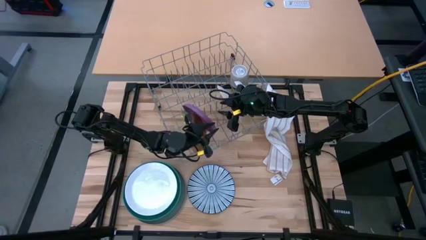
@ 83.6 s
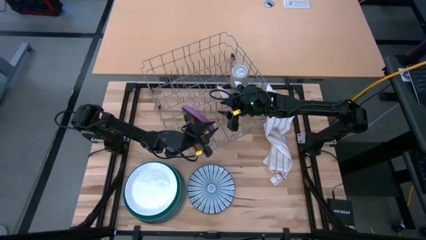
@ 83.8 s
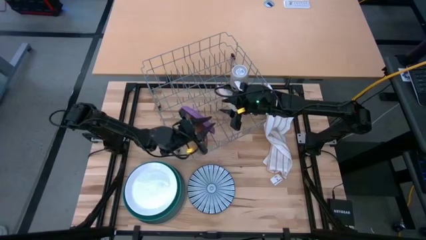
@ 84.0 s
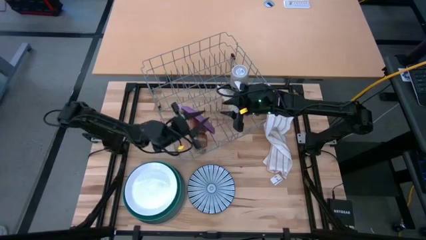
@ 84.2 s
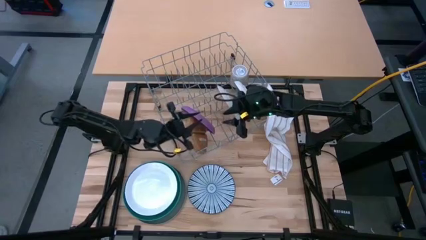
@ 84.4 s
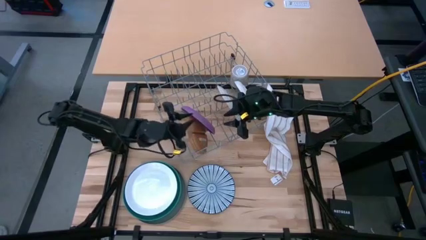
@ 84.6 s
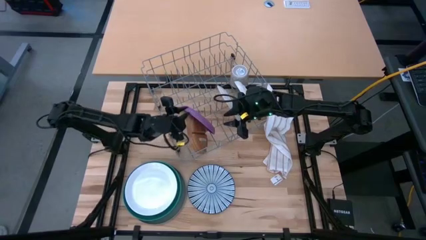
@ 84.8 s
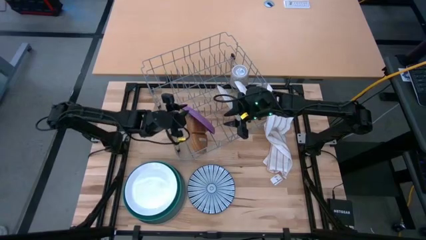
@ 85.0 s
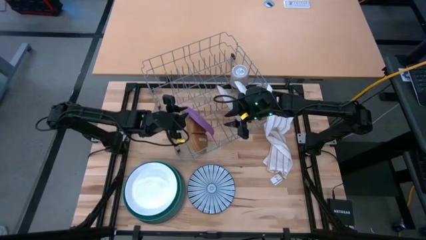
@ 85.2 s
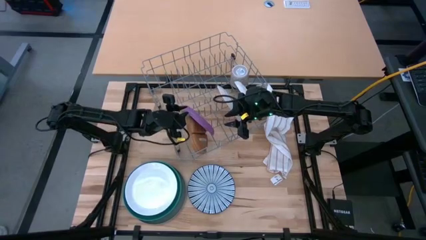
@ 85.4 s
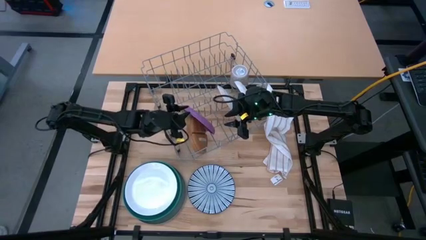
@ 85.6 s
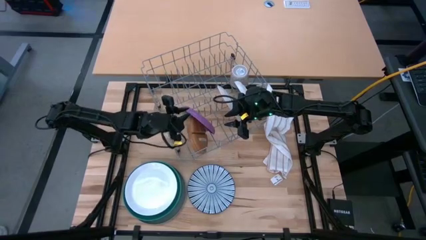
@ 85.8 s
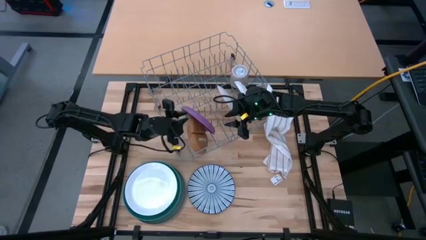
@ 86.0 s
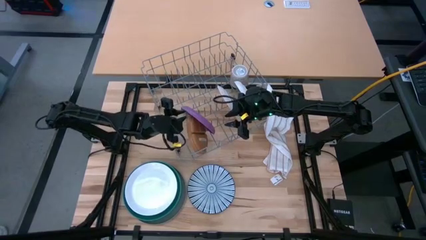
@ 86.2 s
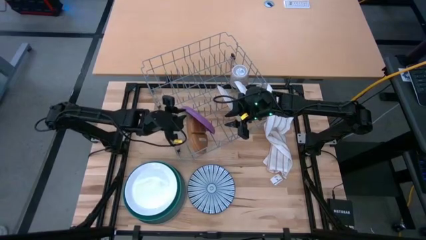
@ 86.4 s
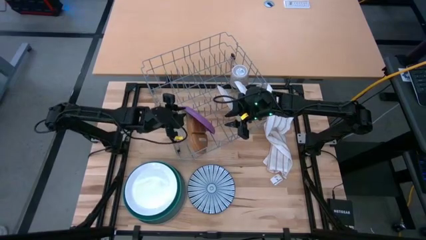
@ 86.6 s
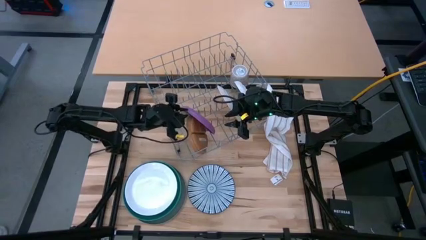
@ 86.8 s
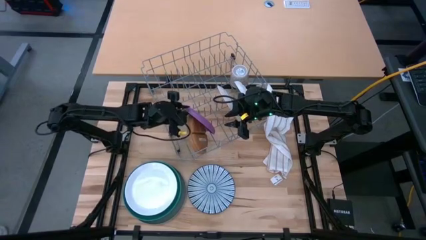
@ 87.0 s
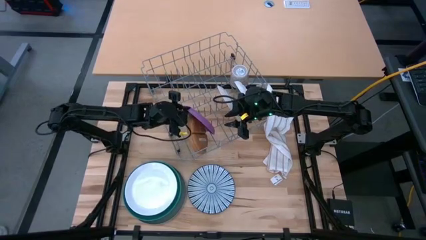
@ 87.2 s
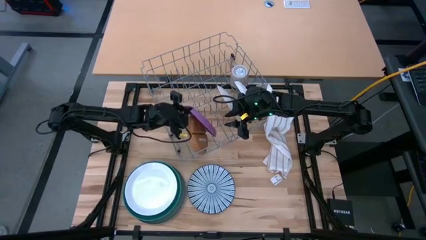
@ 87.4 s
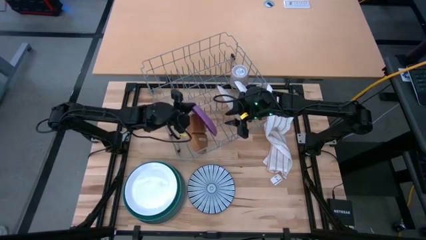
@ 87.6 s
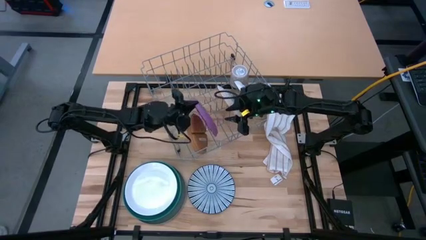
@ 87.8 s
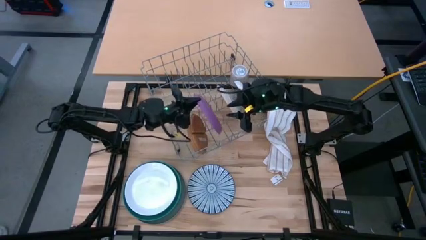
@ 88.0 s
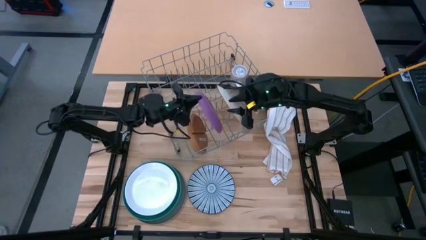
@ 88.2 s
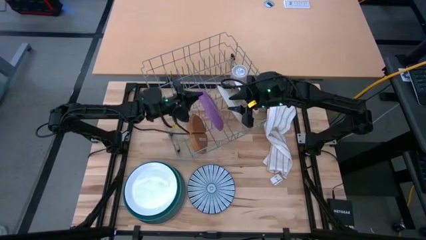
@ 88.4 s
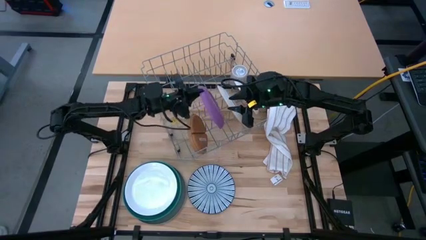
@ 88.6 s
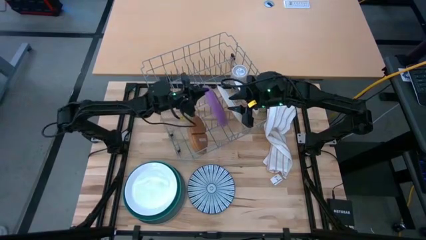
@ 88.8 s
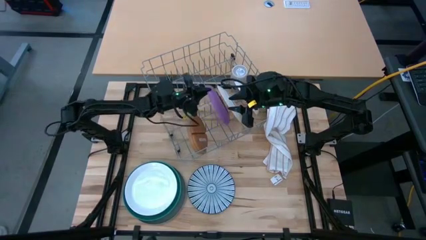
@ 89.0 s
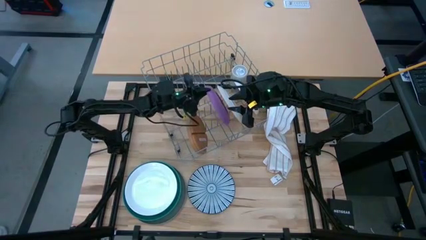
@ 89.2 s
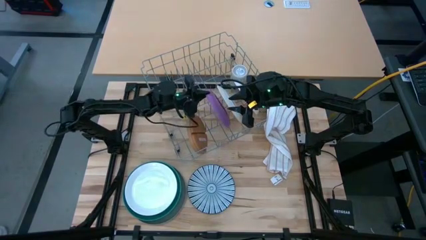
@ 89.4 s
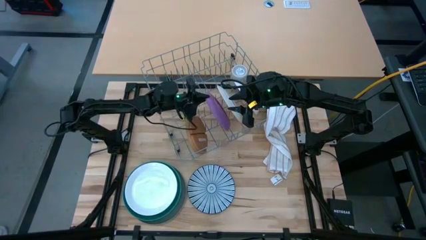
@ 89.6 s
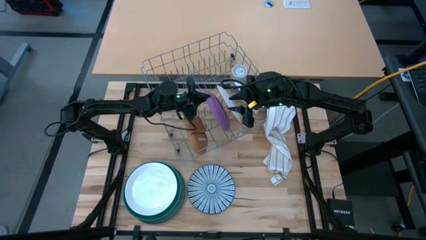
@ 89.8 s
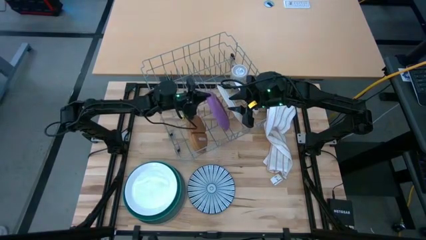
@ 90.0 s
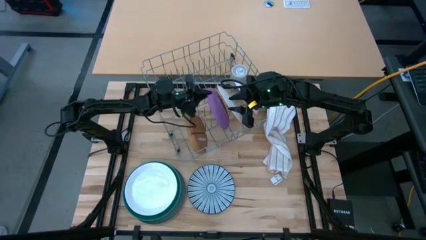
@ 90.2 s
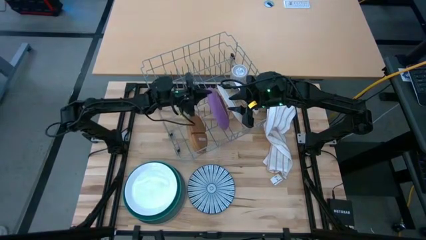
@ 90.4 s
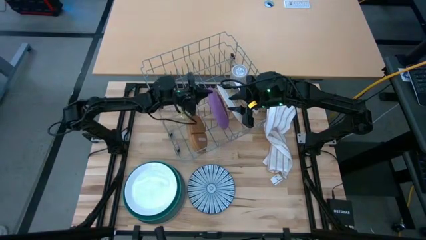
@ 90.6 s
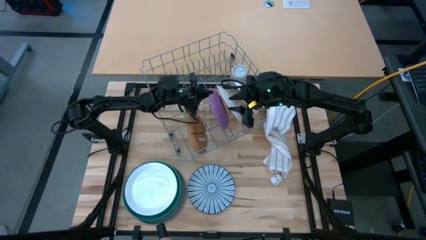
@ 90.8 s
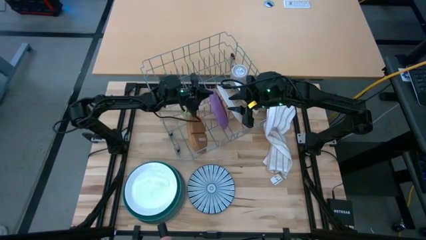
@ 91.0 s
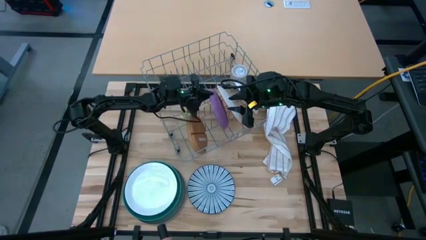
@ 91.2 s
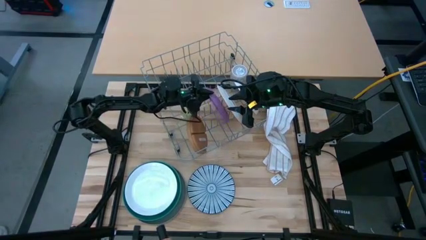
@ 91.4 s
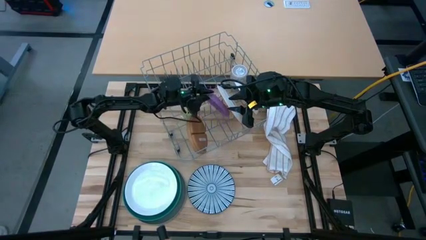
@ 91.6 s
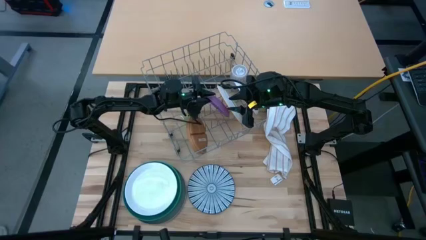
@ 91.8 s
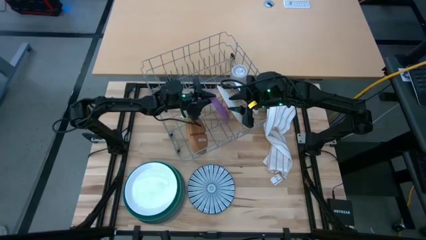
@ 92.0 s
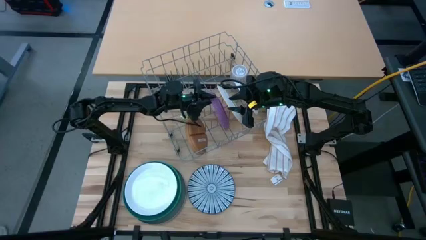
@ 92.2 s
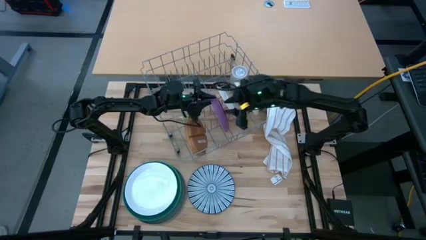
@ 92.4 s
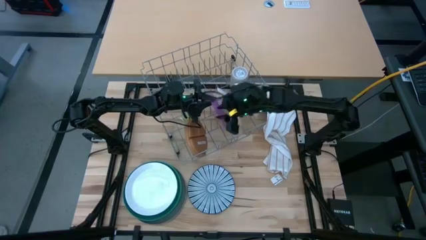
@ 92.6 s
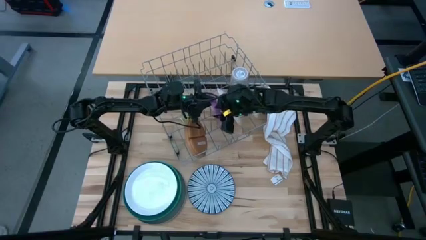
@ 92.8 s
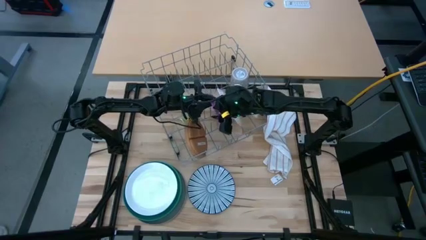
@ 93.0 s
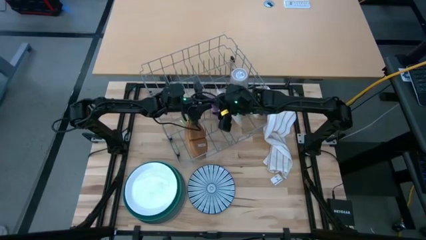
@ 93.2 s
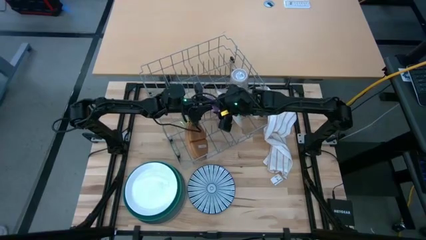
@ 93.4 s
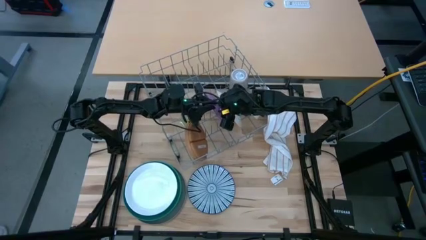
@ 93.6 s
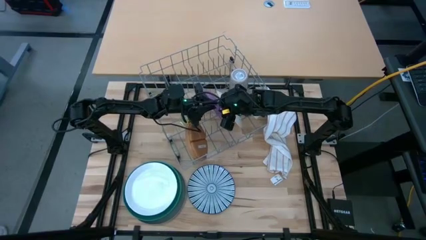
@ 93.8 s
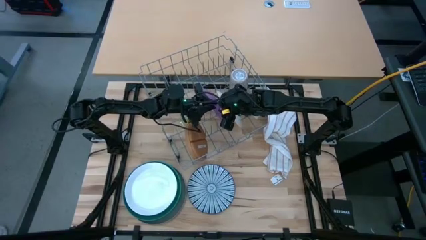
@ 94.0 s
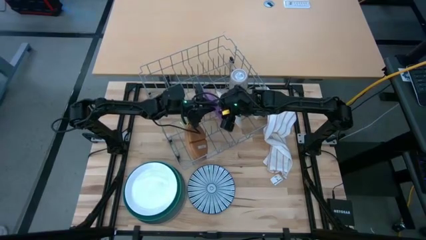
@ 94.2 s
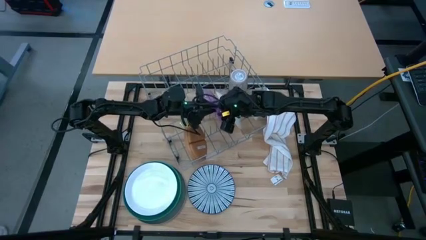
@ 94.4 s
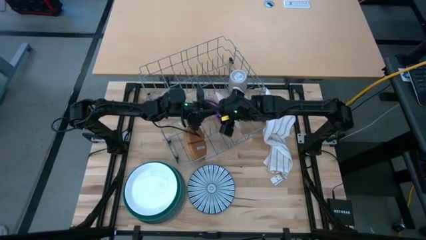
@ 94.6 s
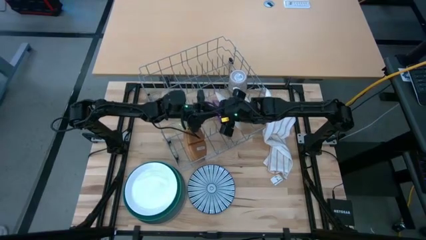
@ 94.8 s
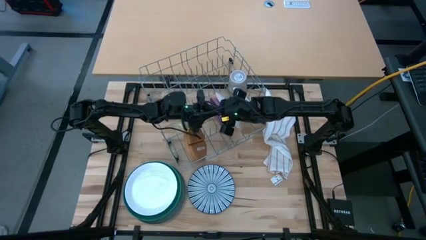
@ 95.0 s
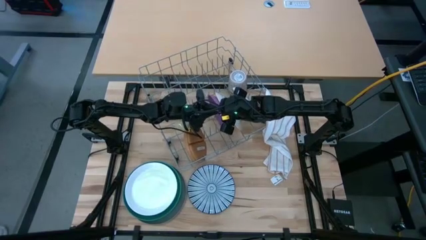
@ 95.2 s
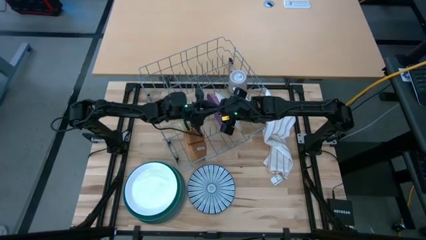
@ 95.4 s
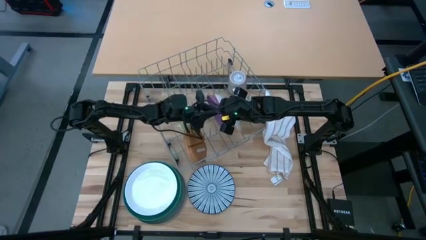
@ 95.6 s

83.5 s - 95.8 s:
Task: Sort dishes
Put the violet plate into the dish rack
